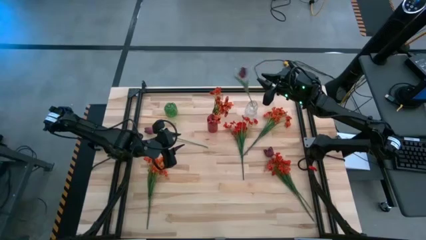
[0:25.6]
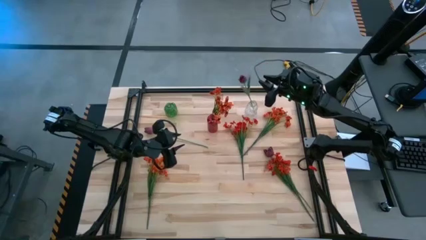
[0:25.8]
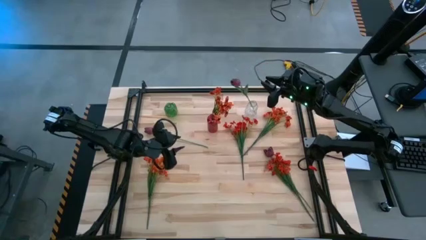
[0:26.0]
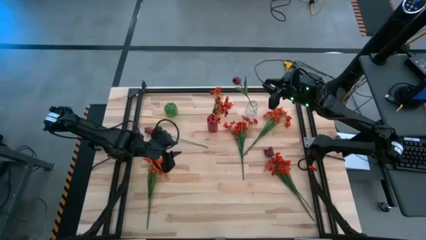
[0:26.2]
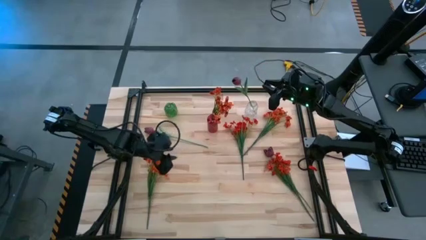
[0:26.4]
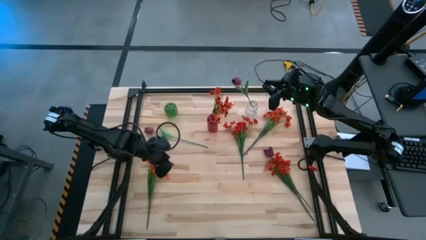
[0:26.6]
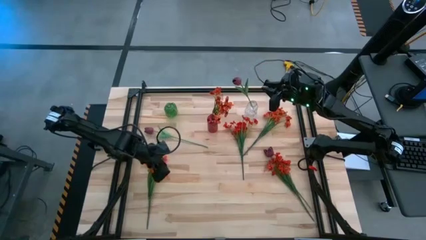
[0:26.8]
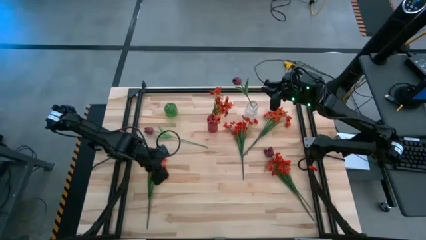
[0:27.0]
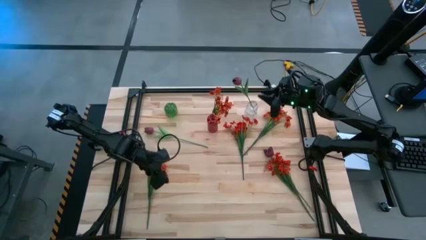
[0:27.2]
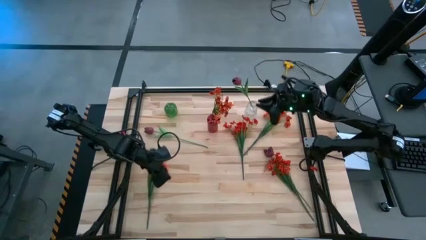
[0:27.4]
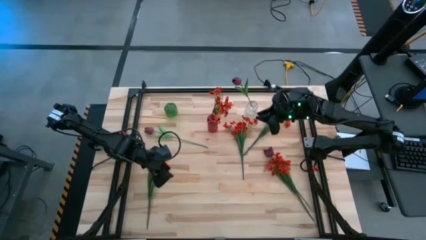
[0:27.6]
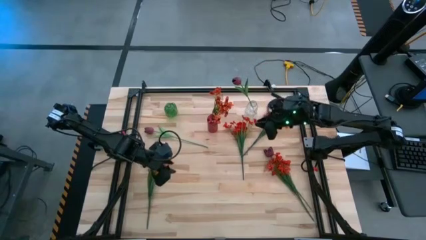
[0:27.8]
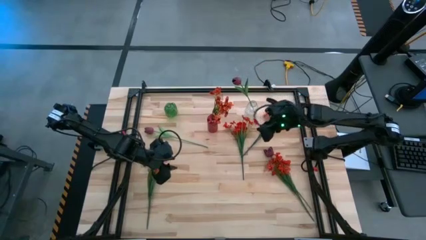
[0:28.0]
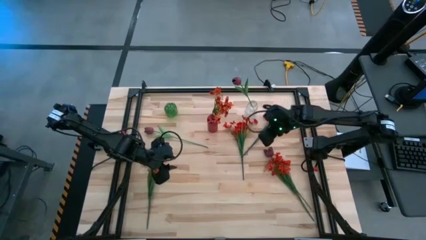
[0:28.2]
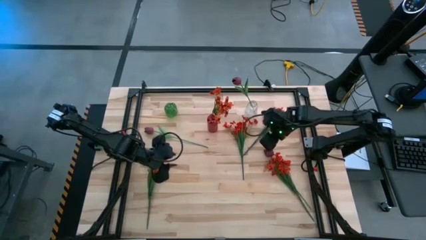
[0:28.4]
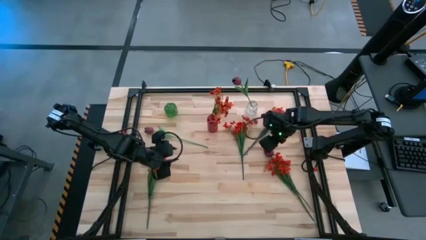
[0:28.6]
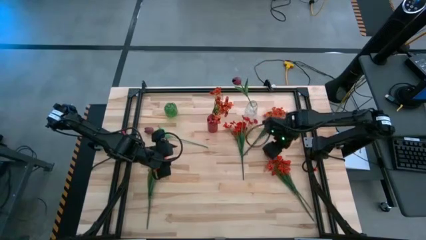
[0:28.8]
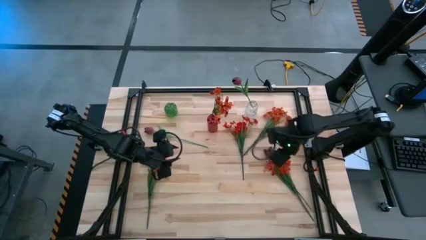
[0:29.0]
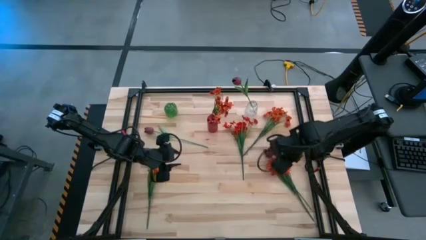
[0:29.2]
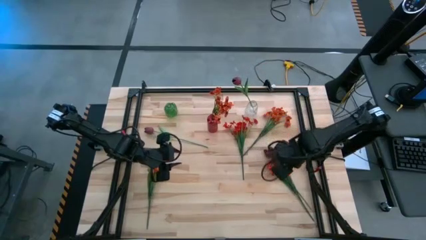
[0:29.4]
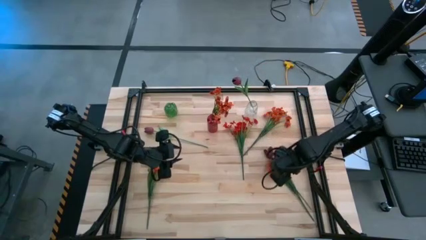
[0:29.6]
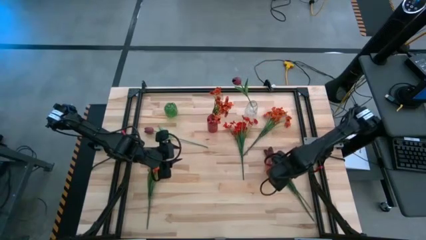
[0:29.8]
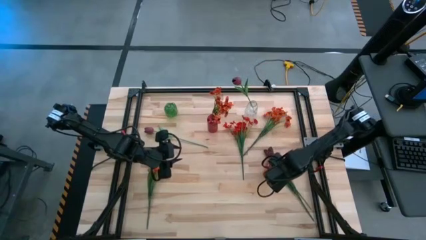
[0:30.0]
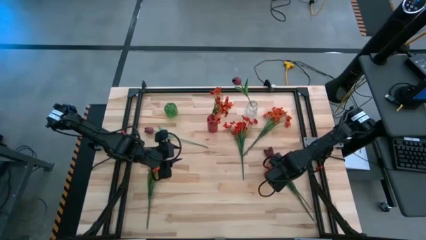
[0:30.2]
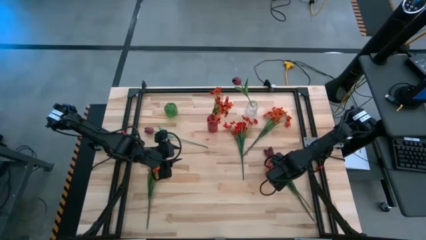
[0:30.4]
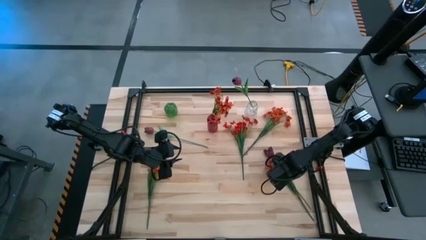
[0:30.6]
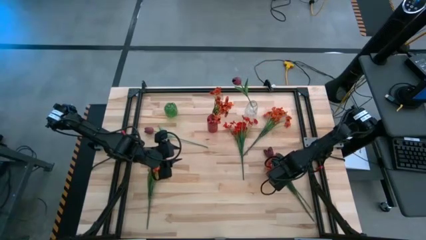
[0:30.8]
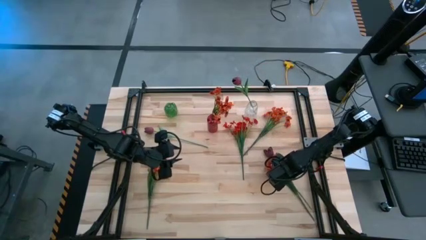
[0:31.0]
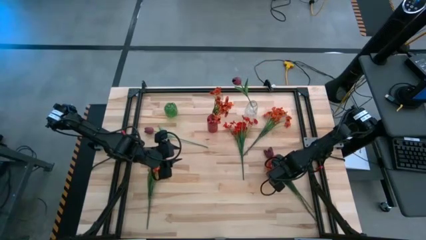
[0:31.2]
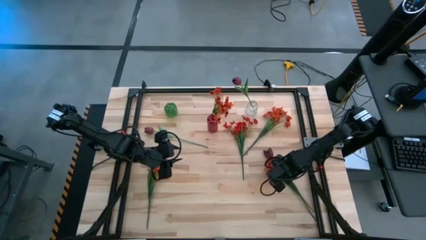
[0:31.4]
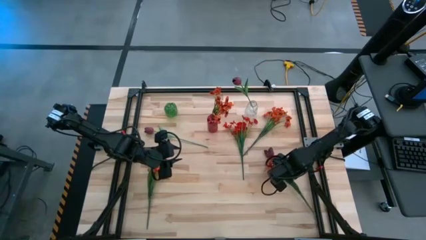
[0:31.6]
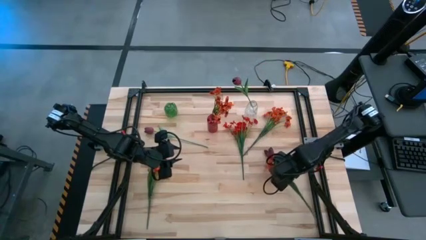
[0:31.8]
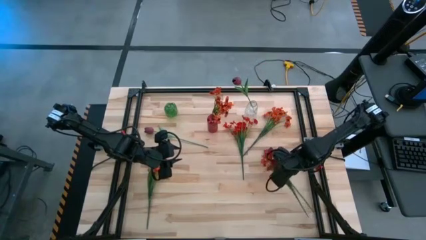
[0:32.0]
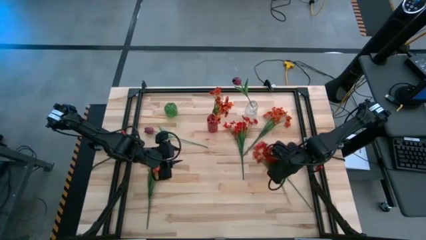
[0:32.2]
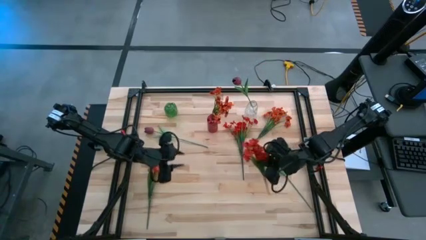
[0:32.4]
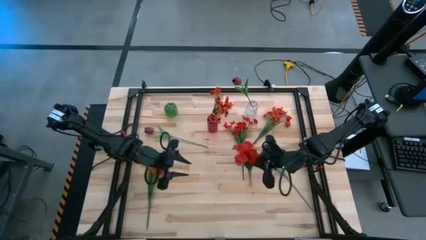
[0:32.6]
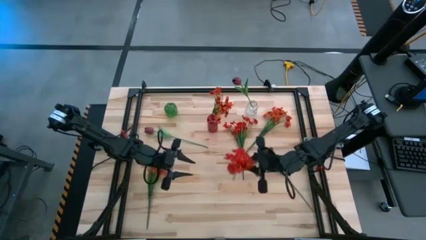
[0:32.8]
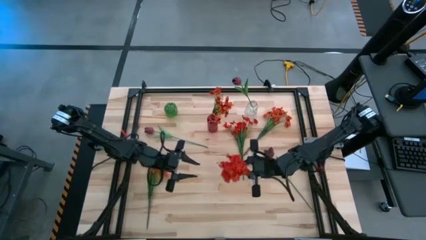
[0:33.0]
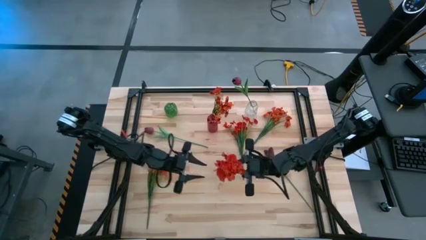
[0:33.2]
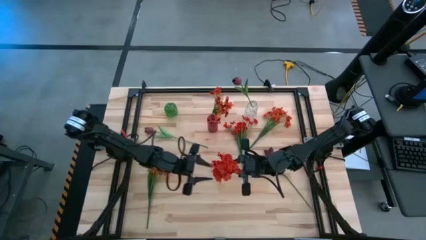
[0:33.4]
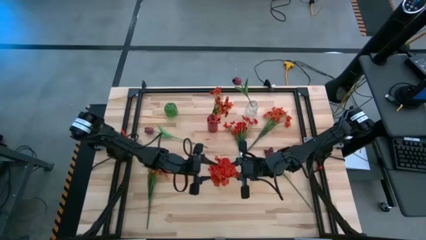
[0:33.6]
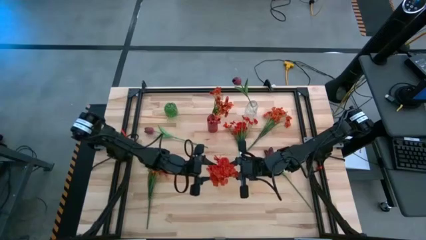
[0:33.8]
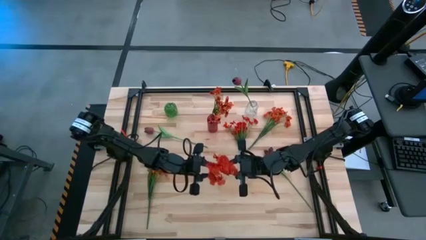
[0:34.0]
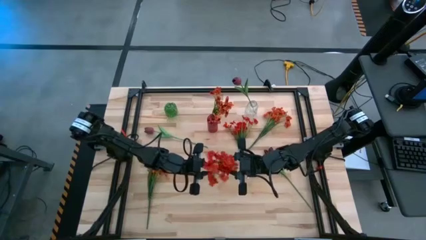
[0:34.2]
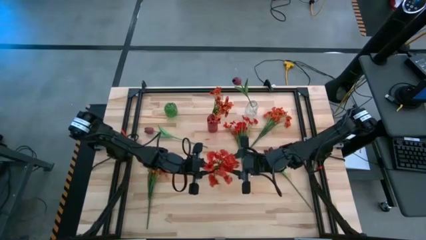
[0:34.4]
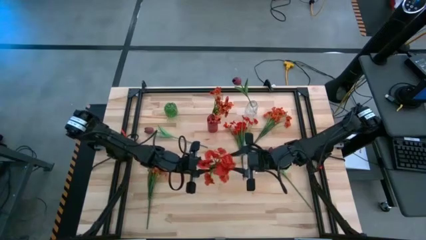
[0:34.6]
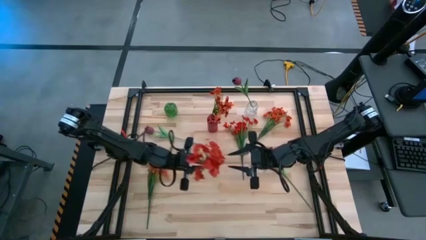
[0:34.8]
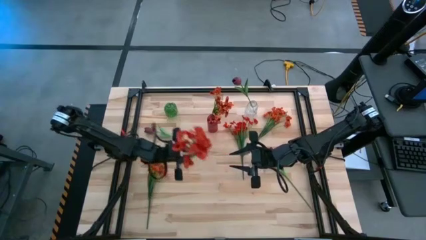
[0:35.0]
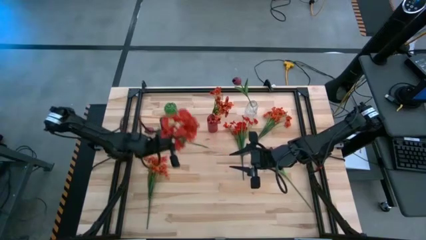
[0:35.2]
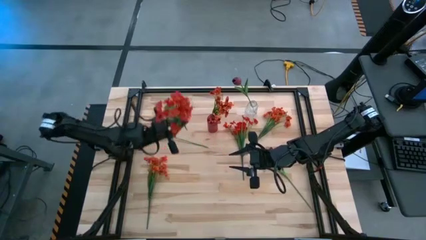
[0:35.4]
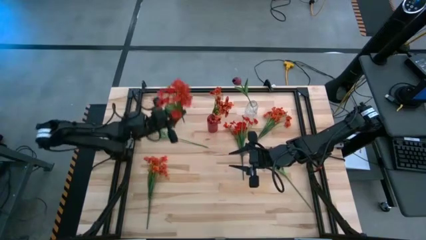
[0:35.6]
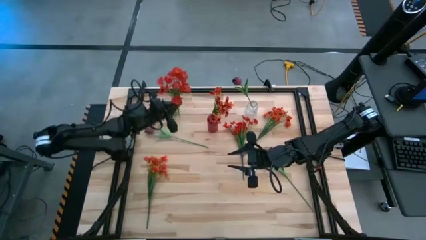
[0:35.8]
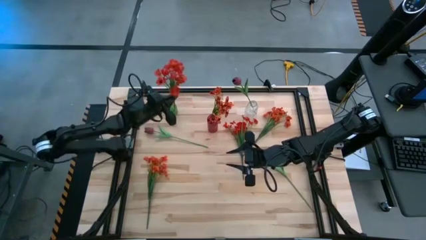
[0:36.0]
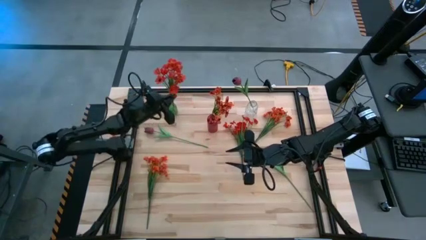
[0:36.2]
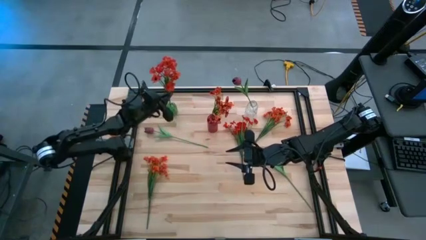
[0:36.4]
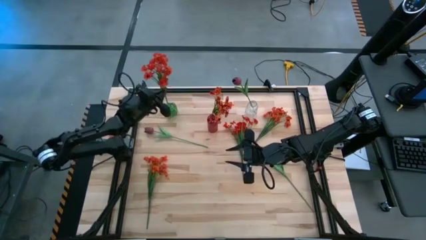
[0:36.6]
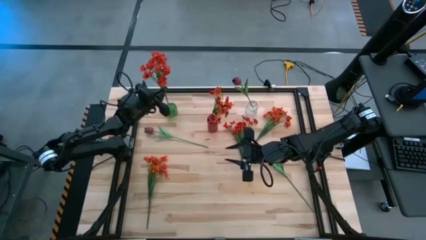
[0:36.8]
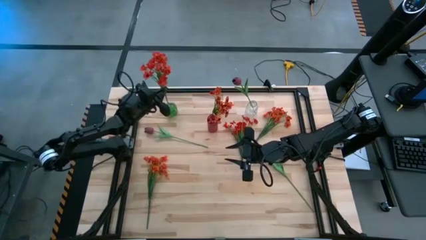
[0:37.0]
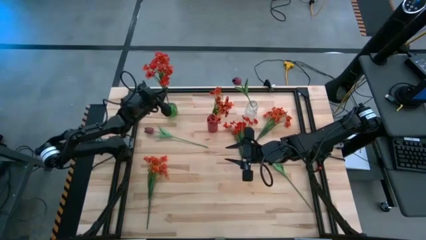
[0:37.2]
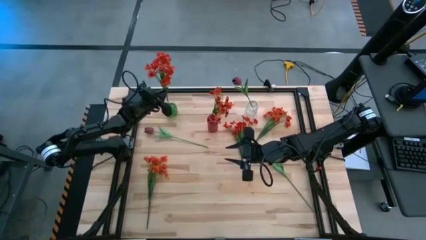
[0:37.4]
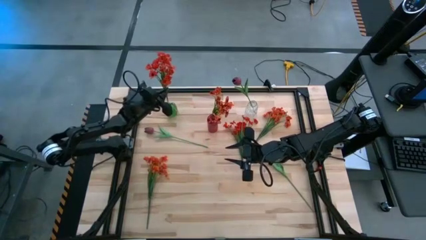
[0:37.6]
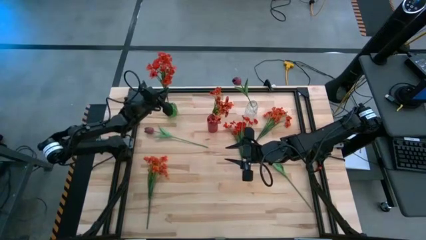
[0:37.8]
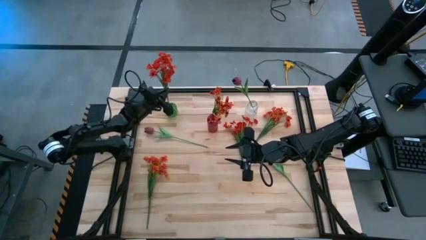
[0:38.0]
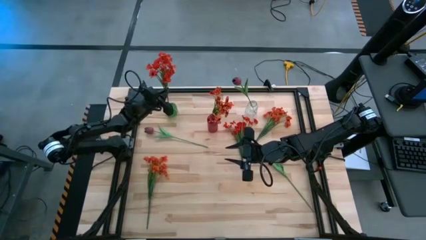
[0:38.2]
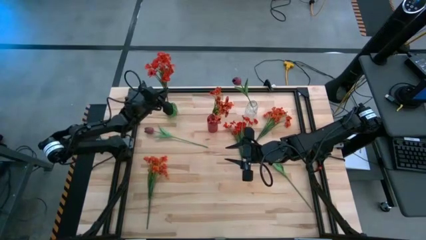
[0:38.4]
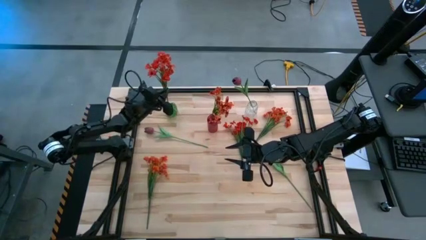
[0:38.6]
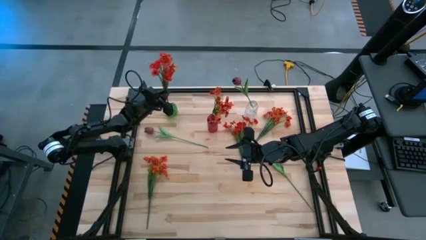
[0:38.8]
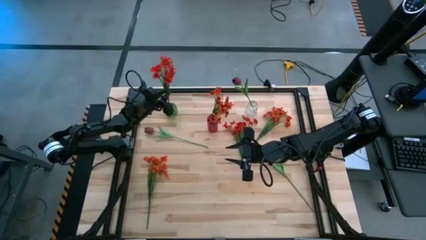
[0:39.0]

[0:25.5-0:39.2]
Task: Sort flowers into vase by color
Put the bottom red flowers into the green vase

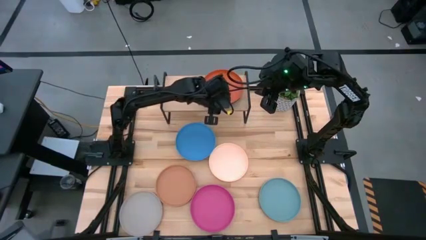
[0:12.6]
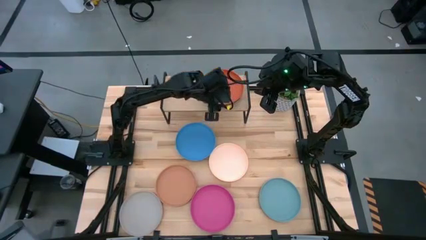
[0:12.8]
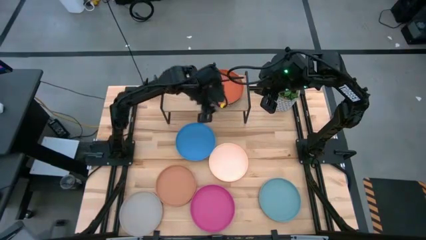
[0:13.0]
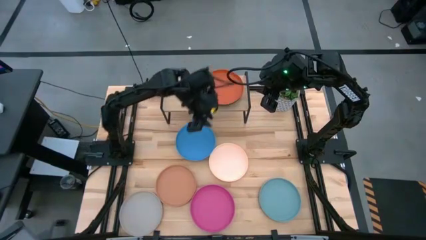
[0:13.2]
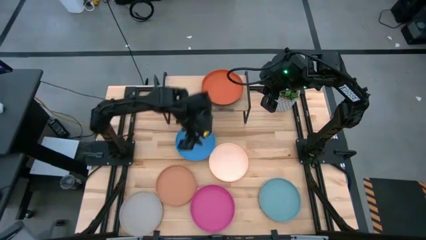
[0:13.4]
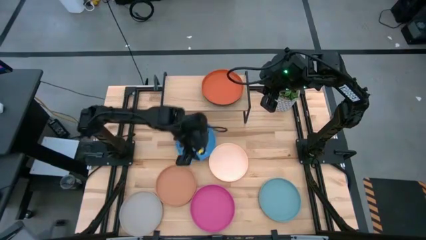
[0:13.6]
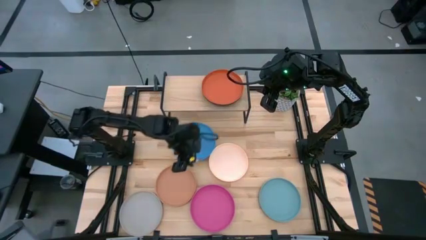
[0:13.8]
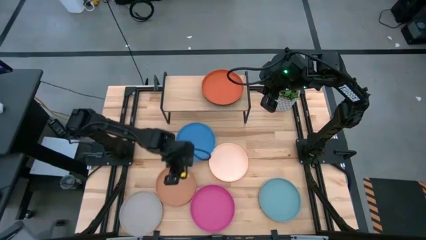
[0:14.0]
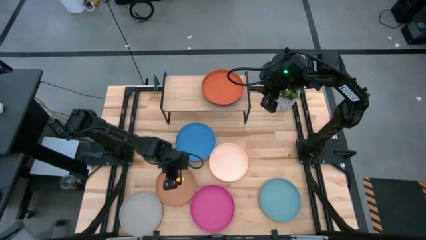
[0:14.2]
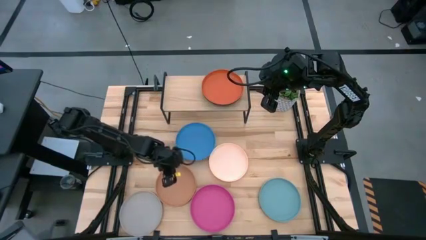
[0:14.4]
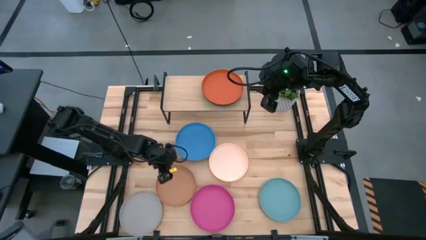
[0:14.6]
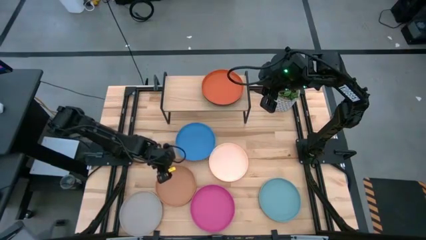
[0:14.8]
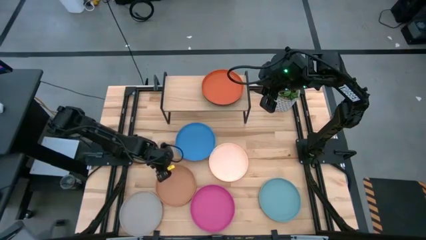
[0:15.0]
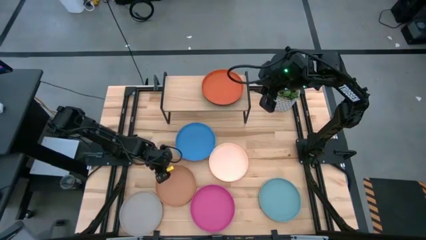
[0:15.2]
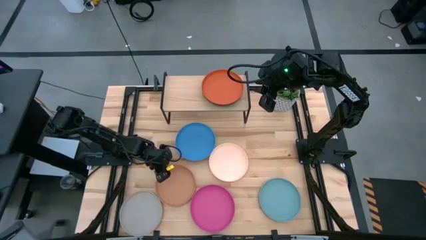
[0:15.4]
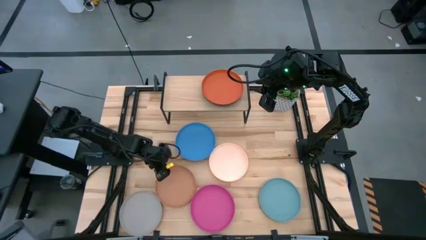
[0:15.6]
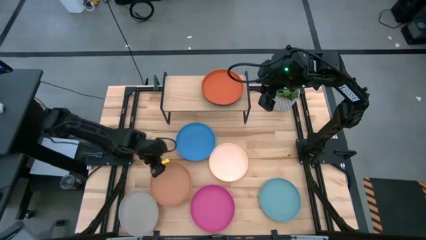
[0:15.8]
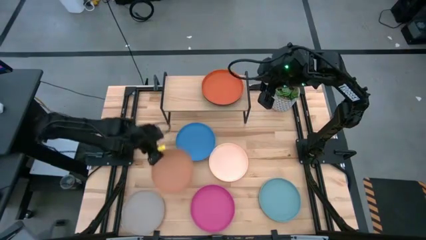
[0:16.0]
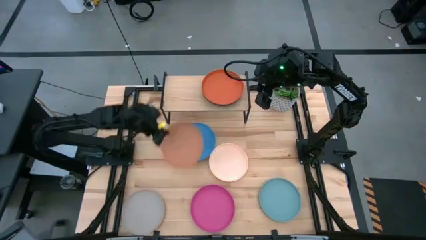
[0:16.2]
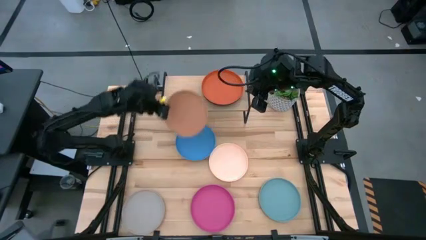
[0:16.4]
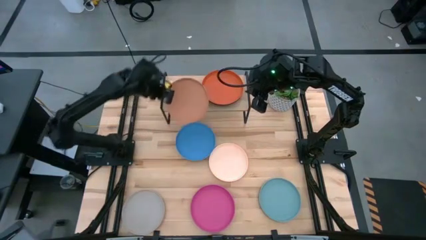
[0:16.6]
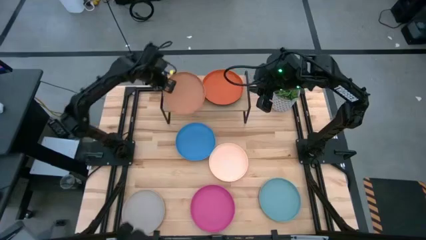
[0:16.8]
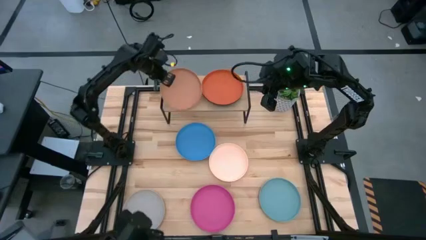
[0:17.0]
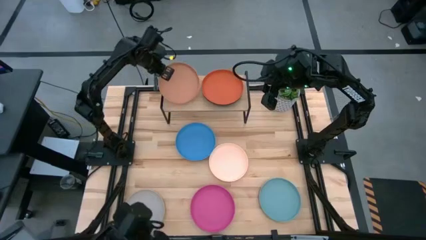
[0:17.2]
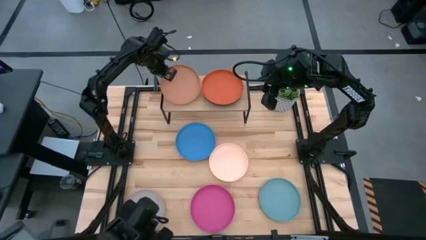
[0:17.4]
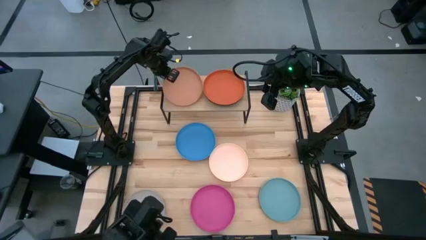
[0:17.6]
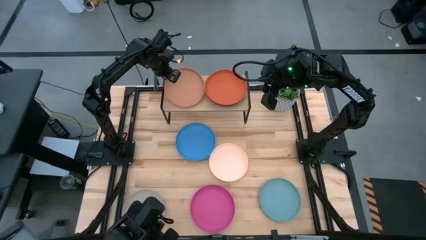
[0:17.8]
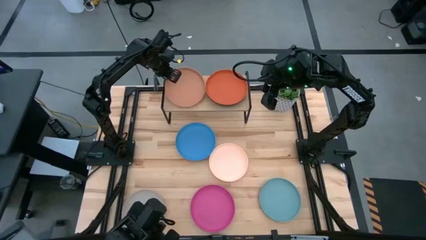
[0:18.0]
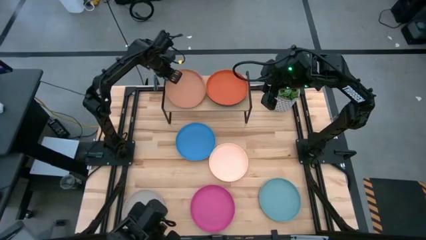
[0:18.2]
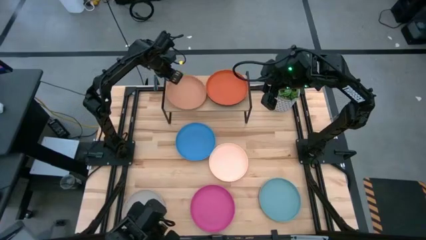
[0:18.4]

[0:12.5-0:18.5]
Task: Place and stack plates onto a shelf
Put the brown plate on the shelf
